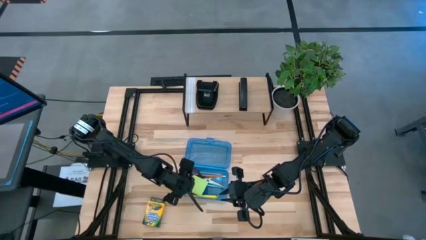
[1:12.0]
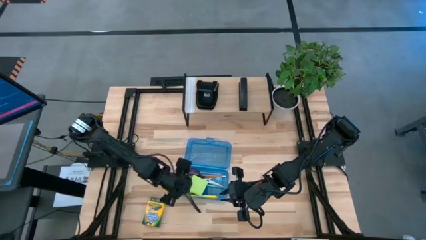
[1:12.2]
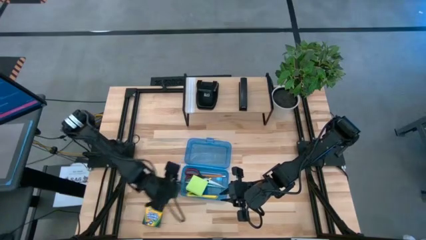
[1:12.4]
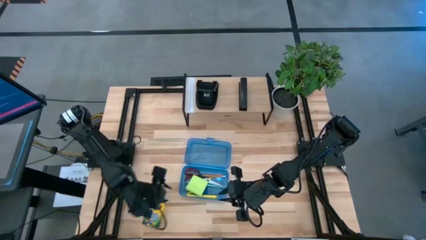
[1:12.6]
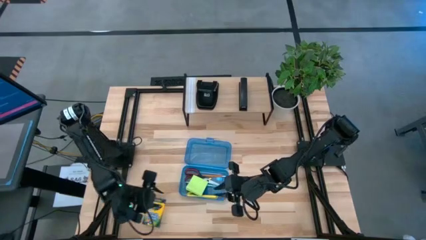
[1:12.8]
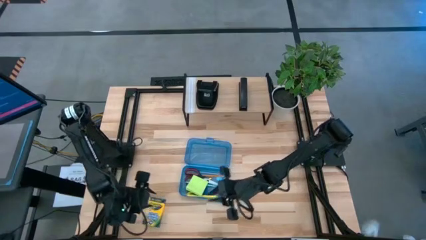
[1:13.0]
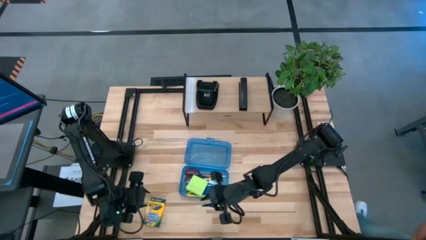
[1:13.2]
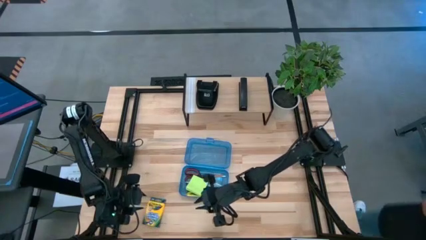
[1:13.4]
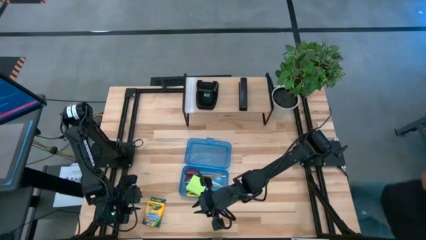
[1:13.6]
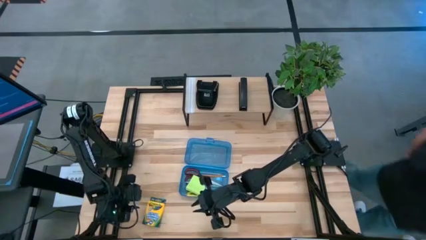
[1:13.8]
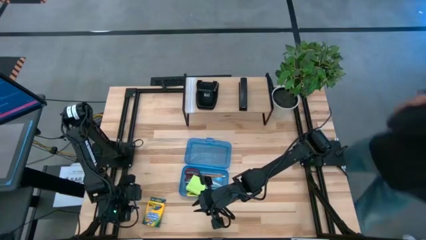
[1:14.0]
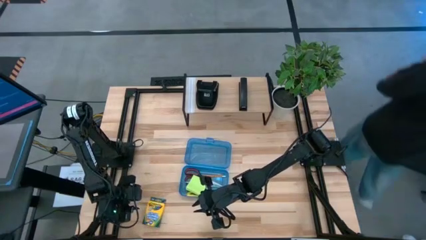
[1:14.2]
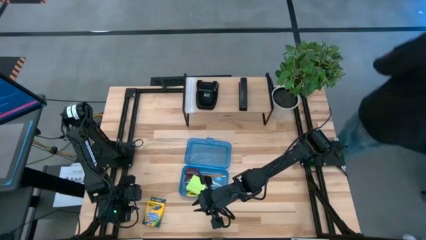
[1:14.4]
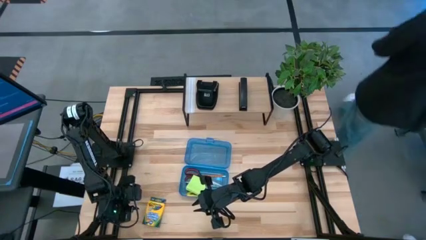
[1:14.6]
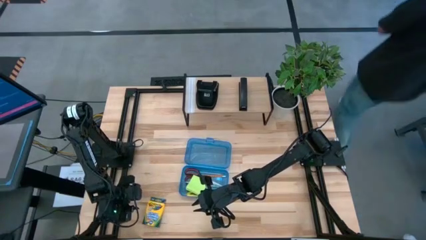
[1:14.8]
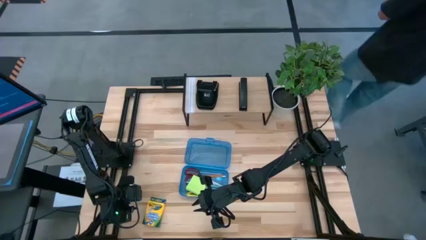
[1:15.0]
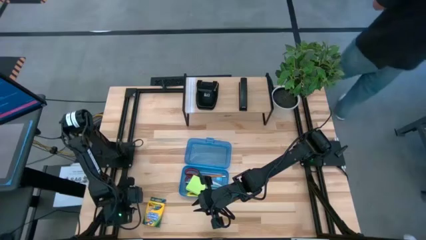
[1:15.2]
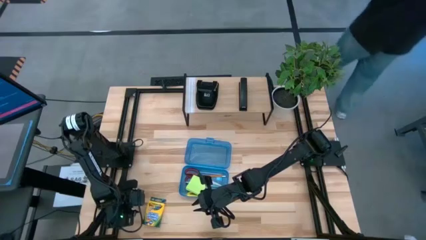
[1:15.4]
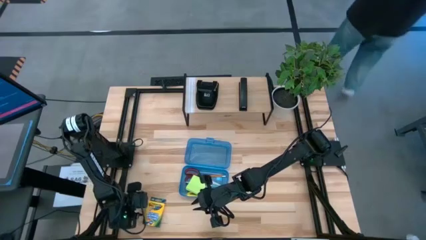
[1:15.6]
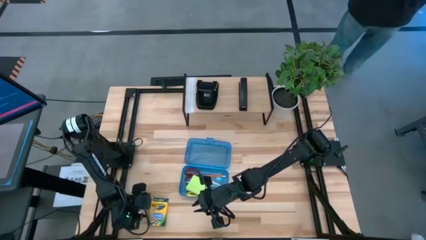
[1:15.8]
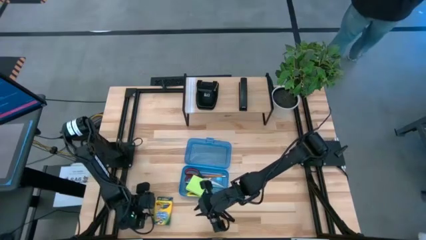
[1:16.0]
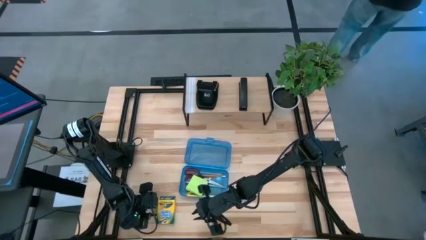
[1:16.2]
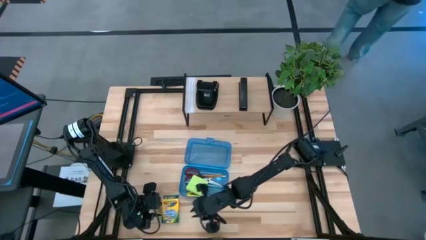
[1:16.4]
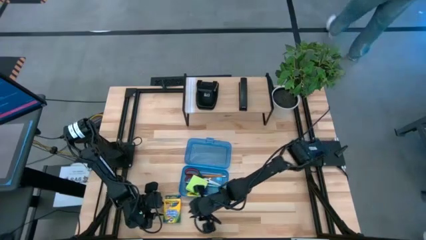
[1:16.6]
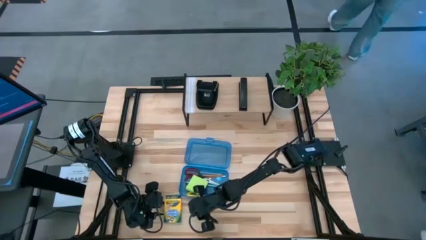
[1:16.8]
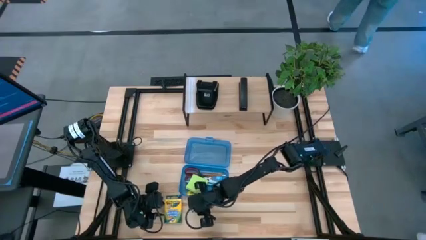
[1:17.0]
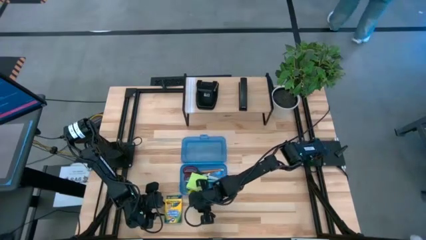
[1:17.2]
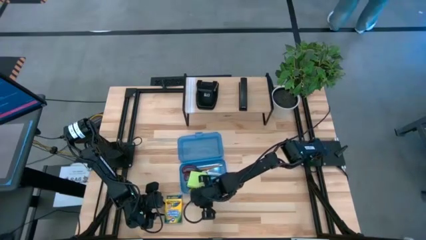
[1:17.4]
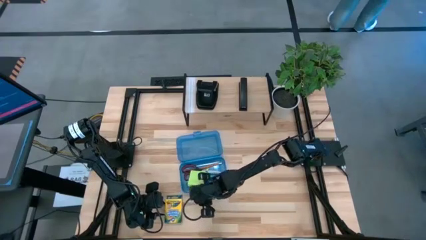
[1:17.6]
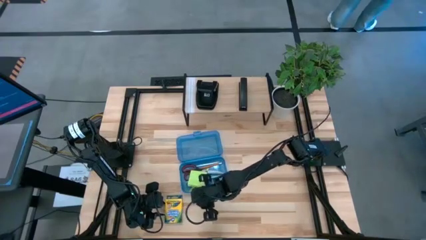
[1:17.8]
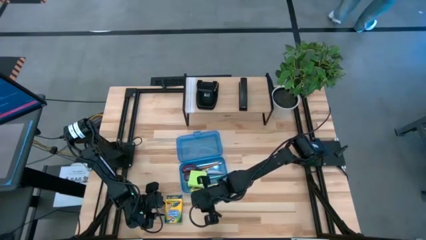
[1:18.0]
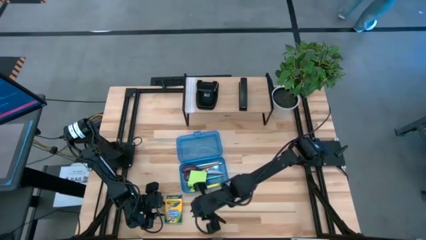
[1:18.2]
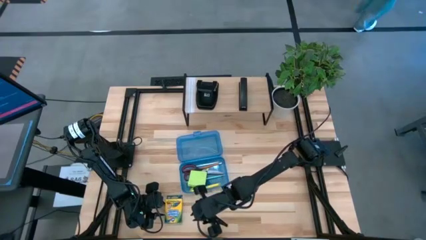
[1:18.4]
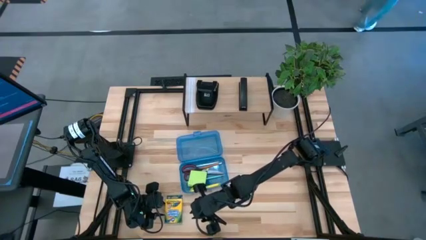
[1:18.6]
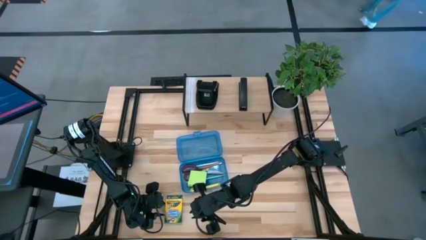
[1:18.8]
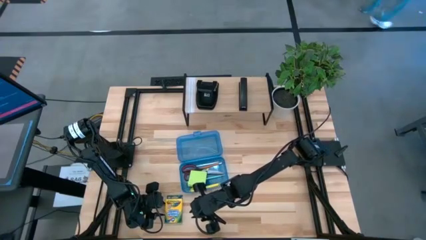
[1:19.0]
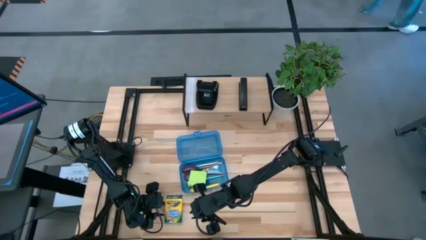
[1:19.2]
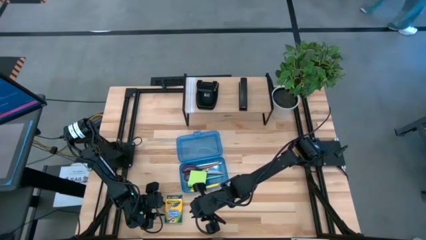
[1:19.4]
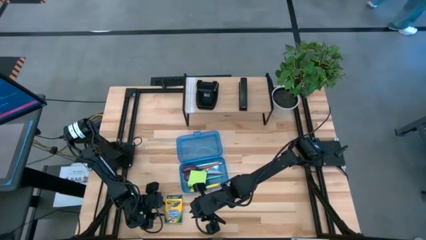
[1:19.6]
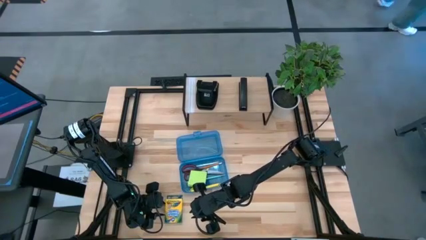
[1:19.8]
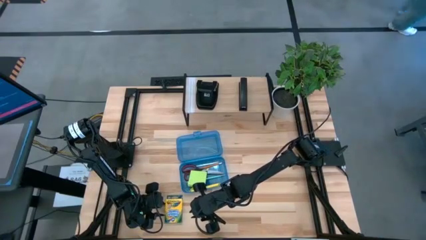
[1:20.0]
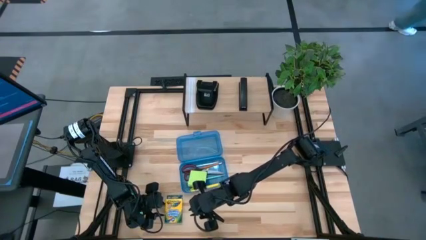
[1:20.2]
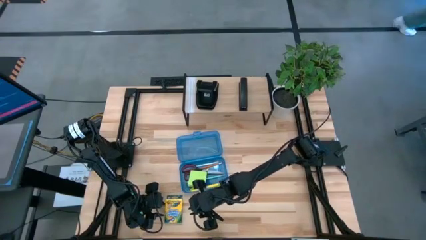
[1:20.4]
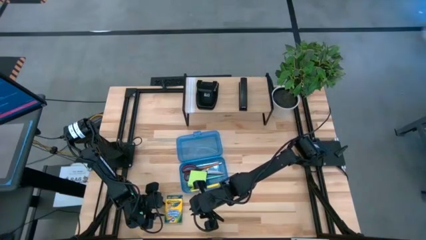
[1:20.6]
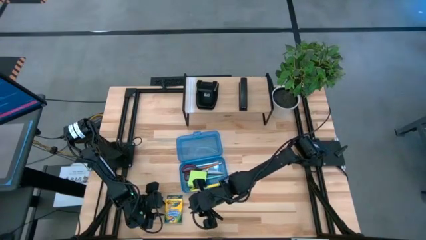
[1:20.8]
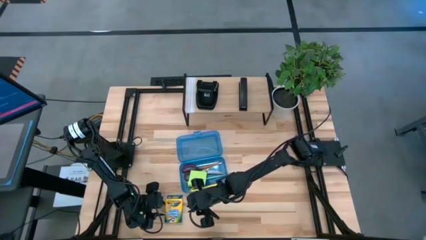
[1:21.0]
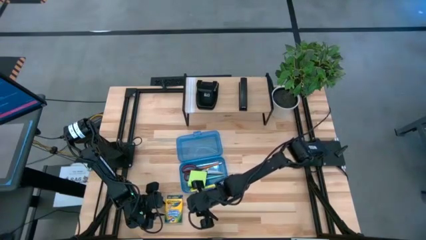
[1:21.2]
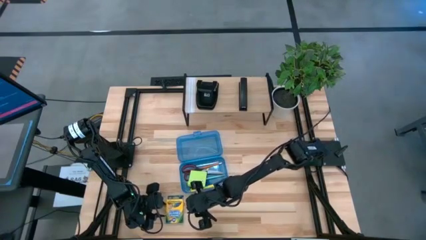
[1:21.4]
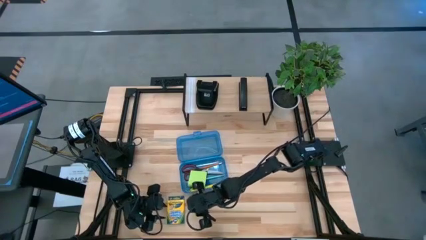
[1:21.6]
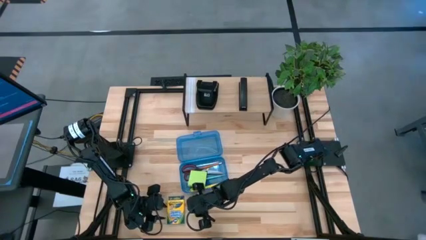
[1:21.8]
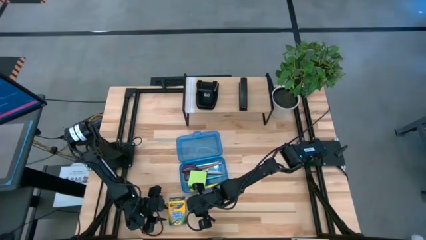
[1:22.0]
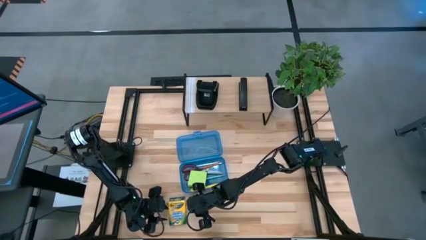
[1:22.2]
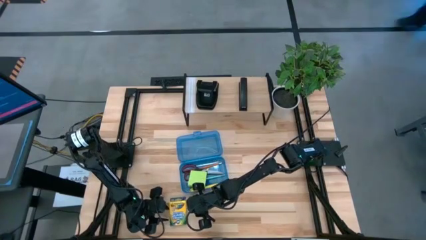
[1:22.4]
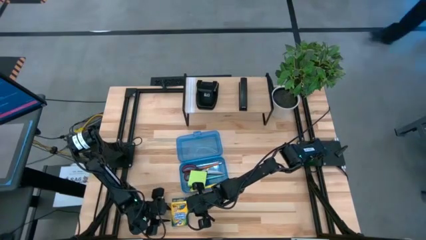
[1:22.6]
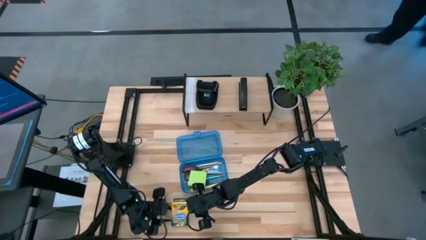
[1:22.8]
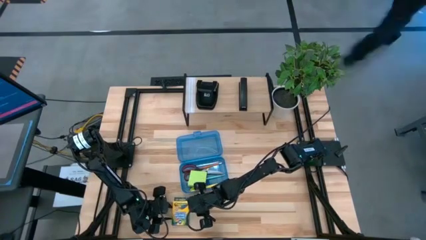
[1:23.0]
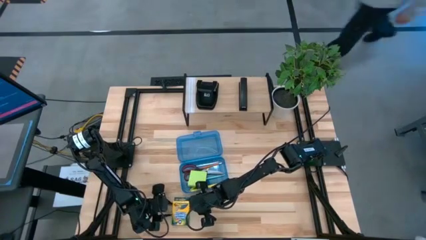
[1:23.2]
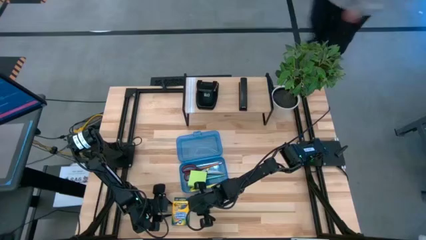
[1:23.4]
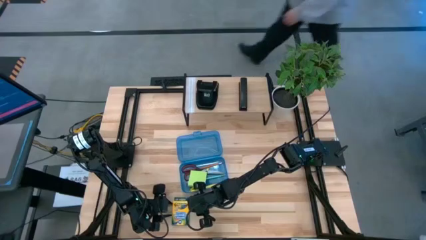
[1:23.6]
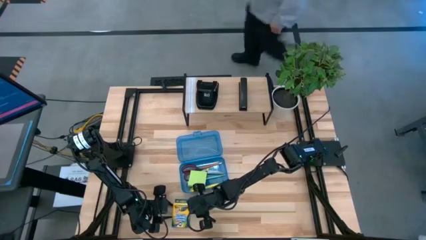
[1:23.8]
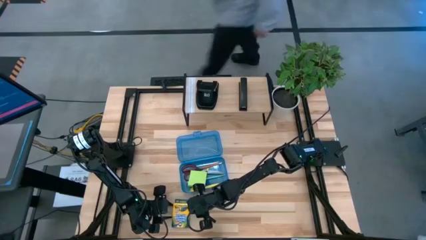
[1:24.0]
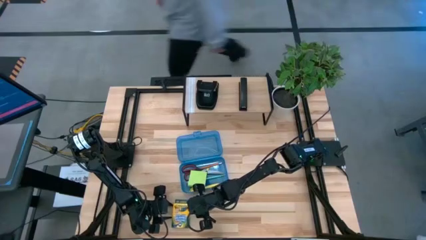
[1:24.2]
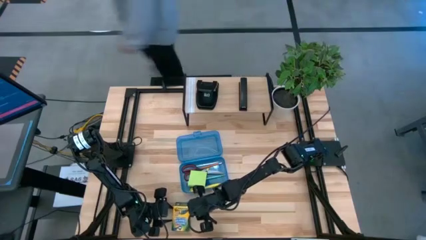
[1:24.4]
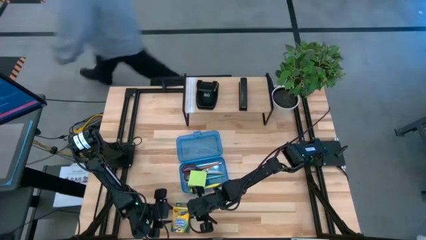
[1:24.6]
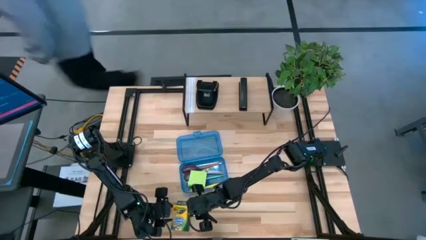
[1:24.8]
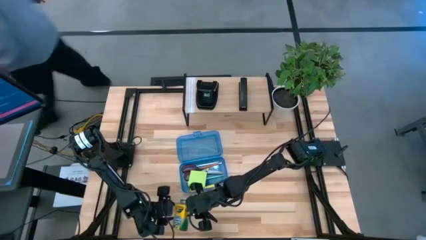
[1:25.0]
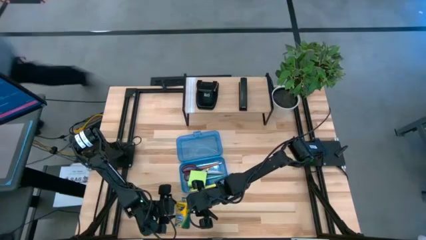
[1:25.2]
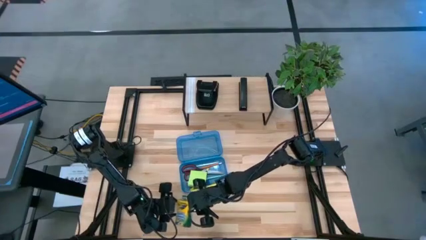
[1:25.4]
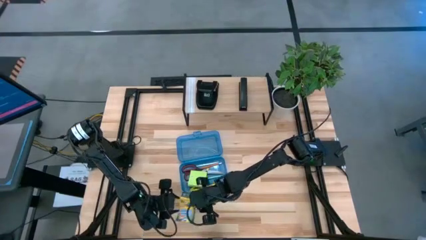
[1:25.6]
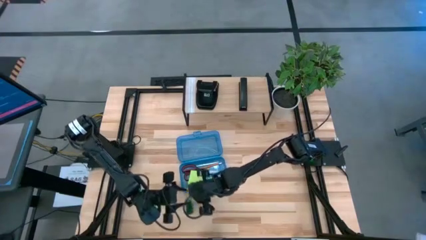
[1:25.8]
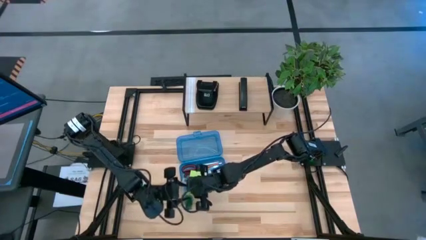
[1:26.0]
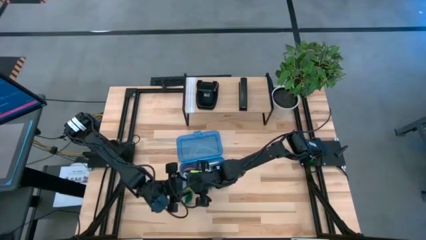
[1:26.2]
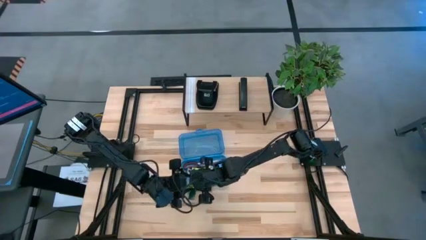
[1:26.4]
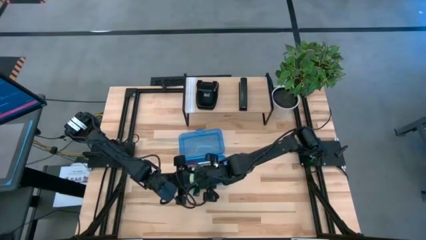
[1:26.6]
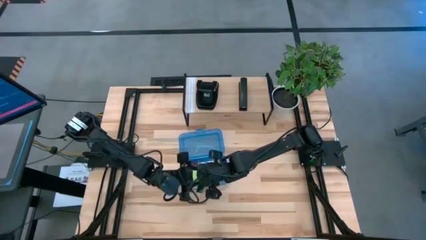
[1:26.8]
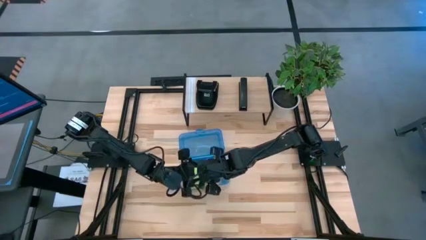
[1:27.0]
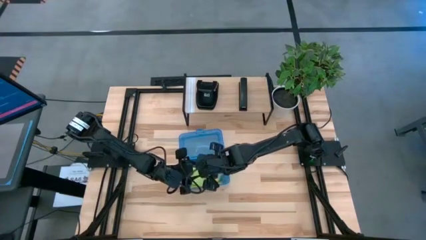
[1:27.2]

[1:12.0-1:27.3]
Task: Pack school essentials
Put the crayon box into the blue supply box

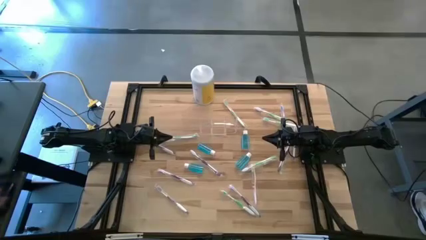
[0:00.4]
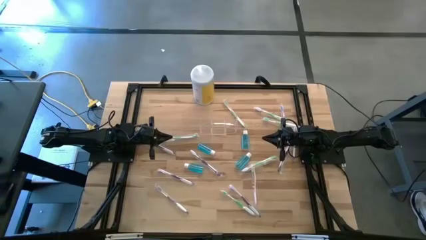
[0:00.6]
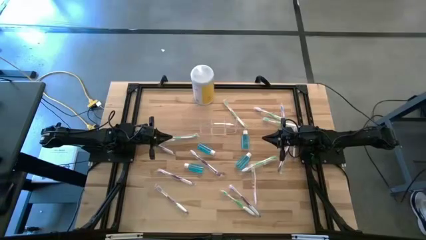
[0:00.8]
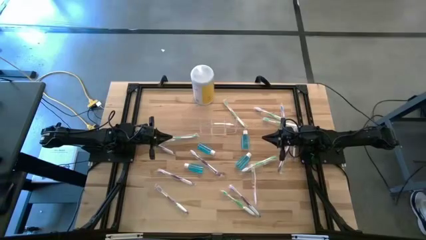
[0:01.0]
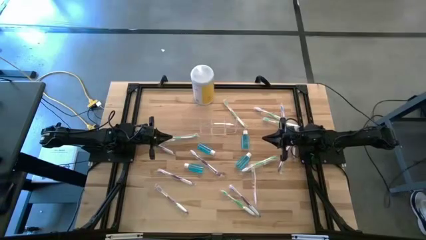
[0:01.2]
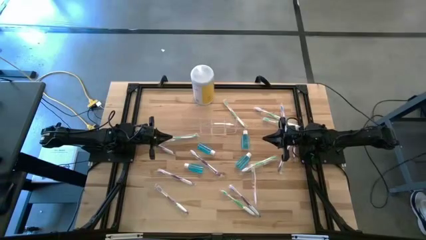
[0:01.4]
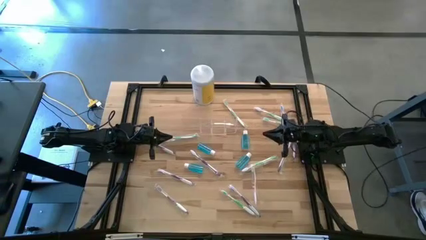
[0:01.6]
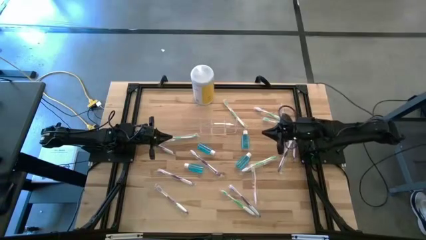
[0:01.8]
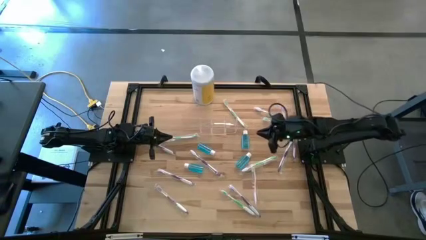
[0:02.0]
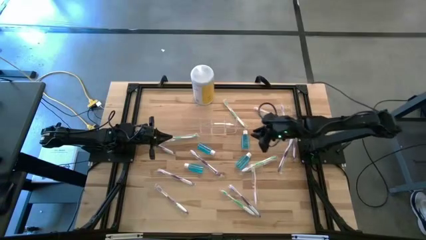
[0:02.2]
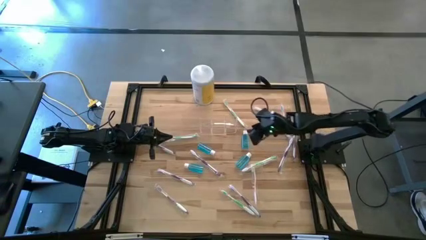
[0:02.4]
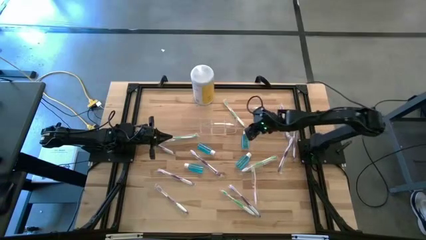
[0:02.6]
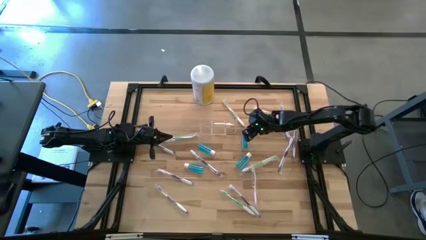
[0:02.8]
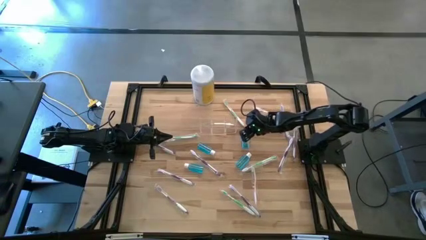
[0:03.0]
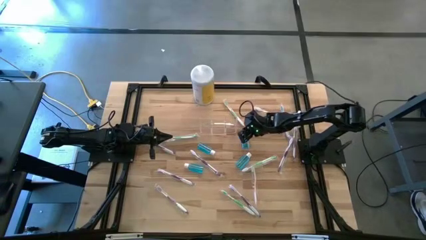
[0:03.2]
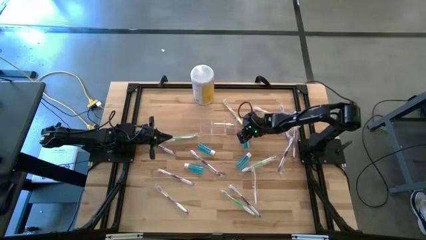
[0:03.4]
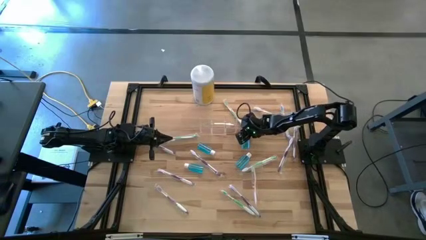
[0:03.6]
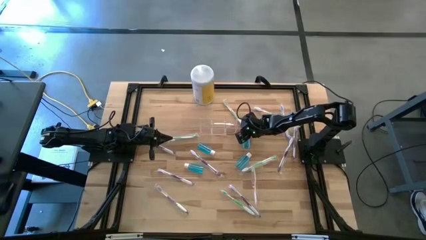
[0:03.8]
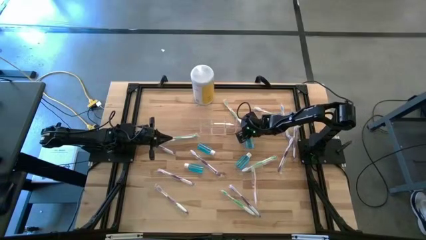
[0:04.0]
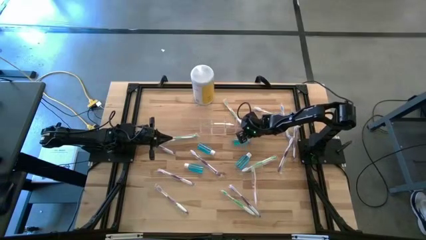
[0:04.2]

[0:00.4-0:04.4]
Task: Pick & Place toothbrushing station
Put the mouthwash into the transparent organizer
